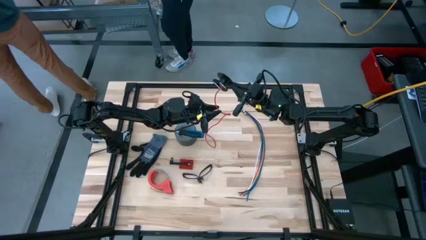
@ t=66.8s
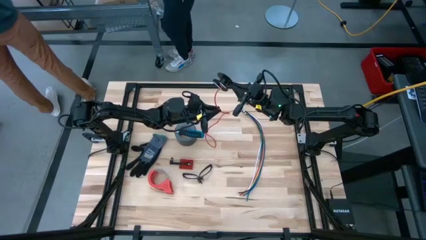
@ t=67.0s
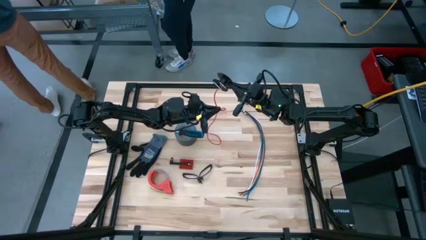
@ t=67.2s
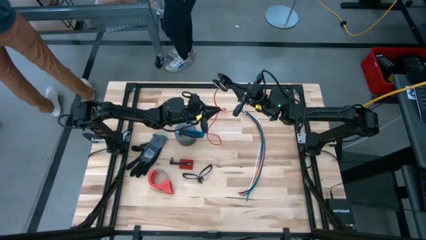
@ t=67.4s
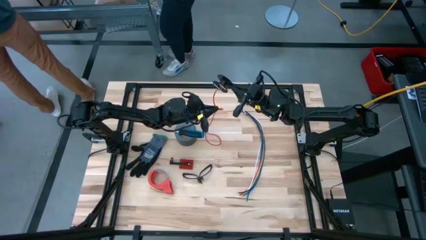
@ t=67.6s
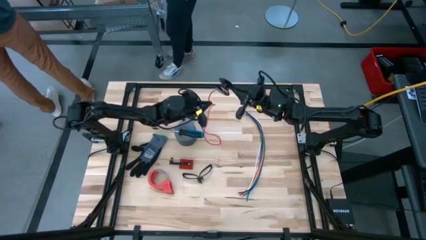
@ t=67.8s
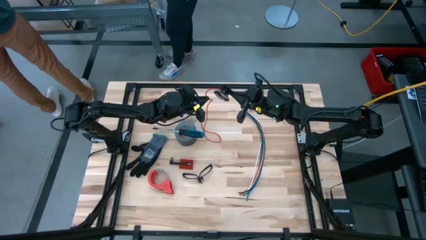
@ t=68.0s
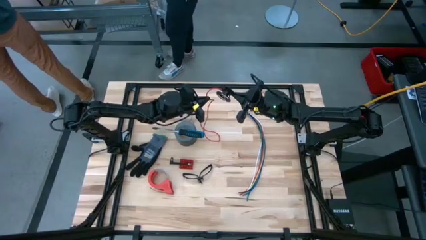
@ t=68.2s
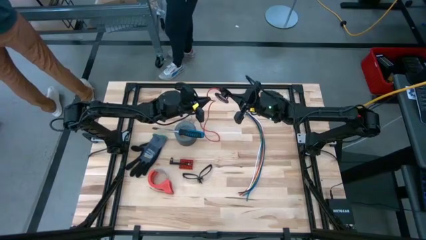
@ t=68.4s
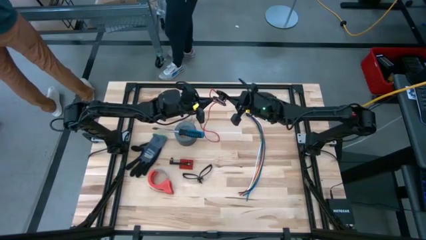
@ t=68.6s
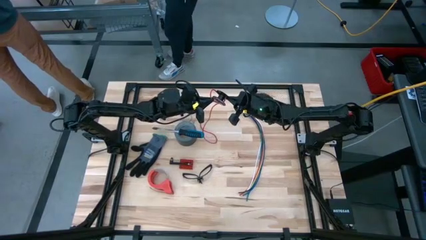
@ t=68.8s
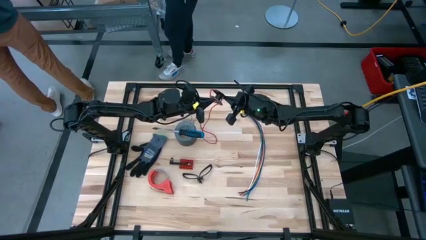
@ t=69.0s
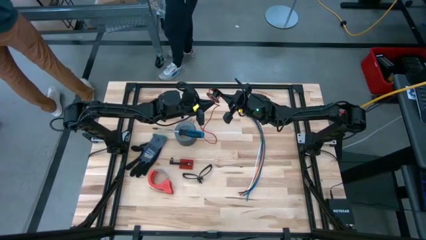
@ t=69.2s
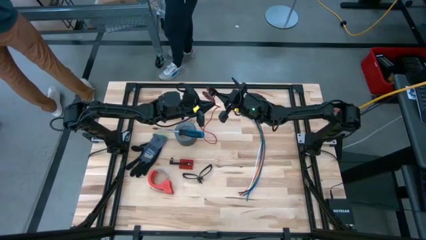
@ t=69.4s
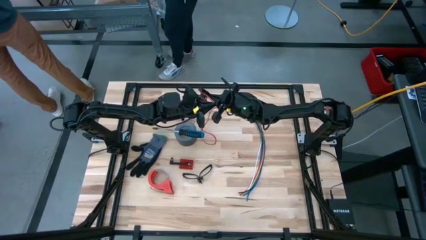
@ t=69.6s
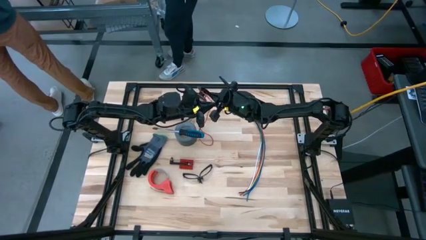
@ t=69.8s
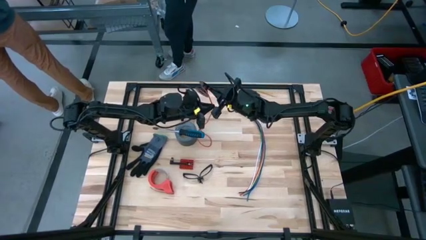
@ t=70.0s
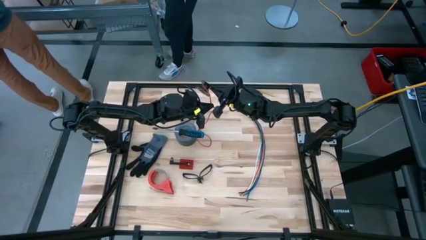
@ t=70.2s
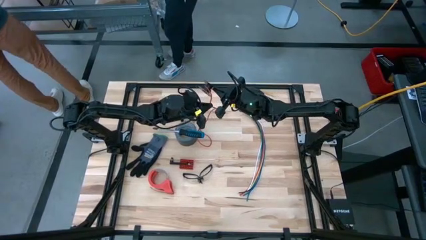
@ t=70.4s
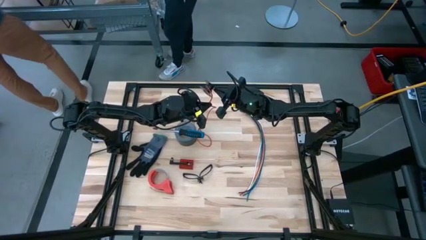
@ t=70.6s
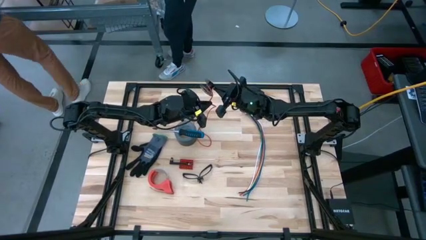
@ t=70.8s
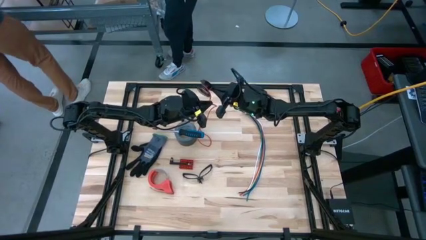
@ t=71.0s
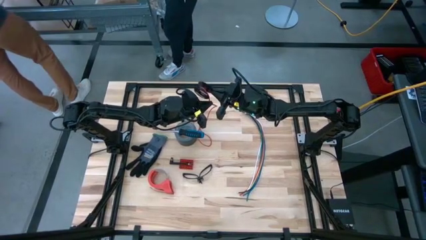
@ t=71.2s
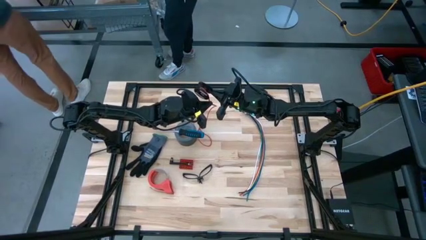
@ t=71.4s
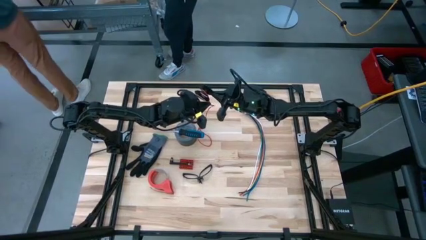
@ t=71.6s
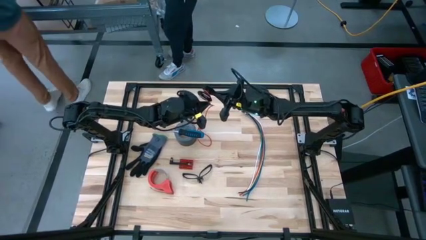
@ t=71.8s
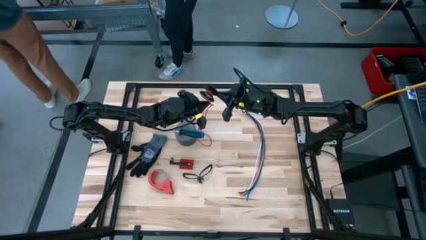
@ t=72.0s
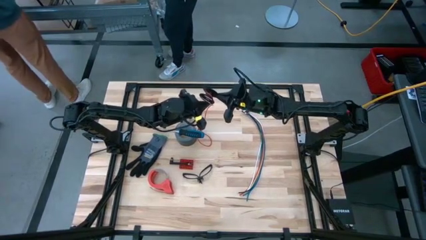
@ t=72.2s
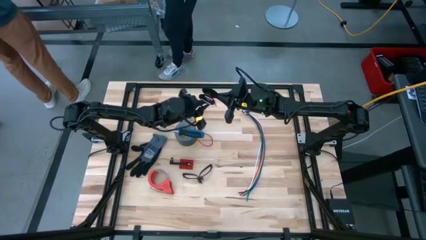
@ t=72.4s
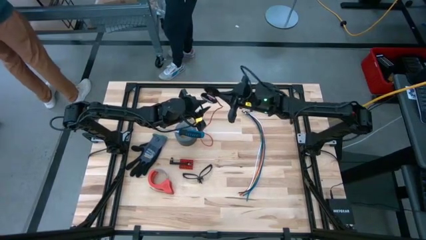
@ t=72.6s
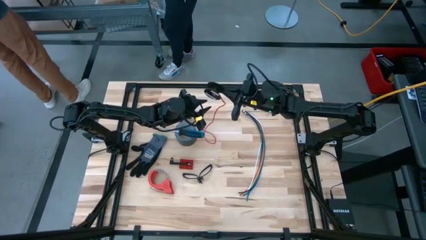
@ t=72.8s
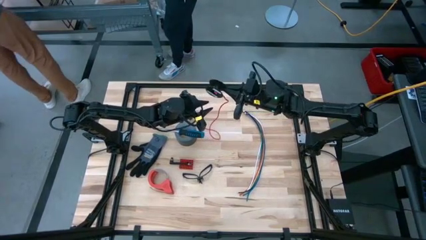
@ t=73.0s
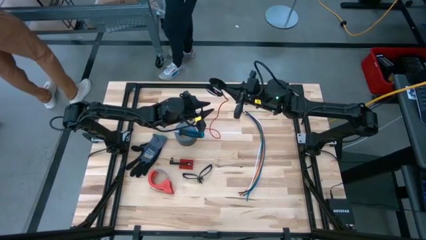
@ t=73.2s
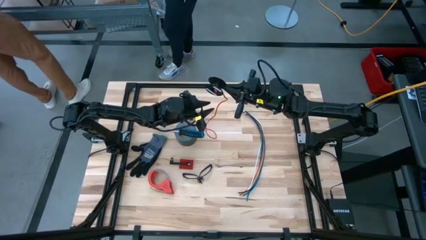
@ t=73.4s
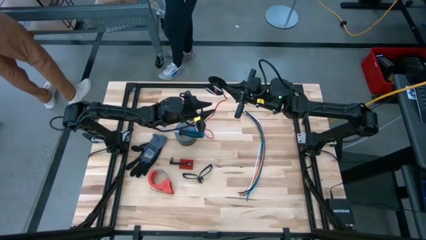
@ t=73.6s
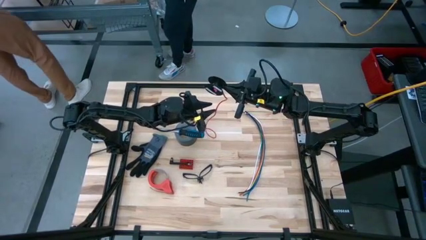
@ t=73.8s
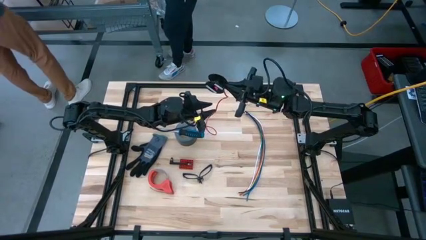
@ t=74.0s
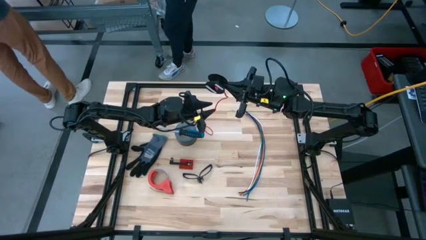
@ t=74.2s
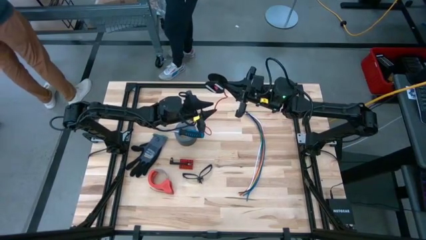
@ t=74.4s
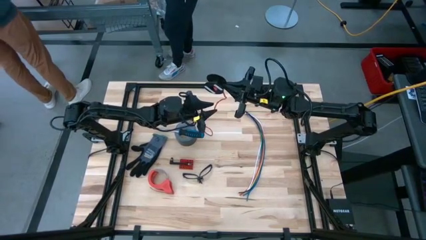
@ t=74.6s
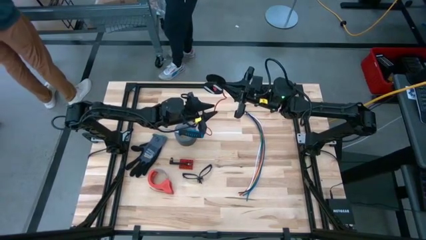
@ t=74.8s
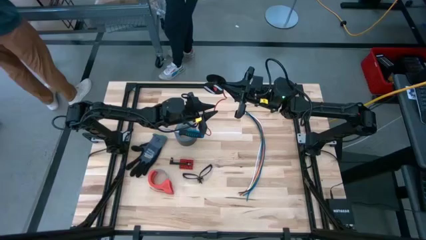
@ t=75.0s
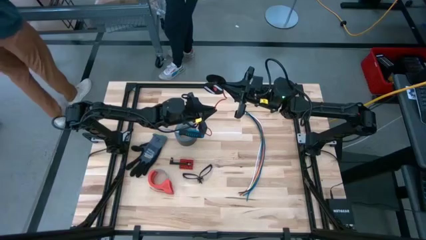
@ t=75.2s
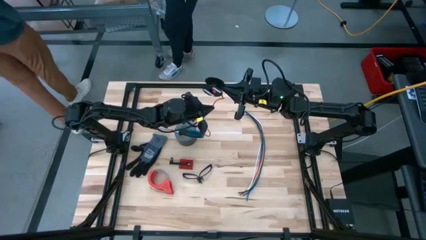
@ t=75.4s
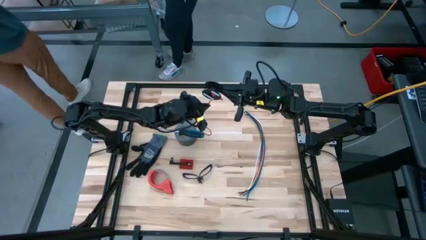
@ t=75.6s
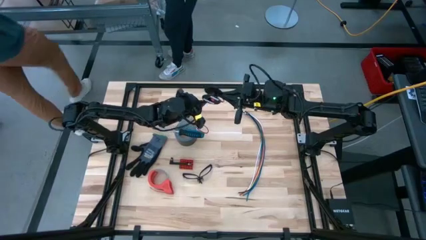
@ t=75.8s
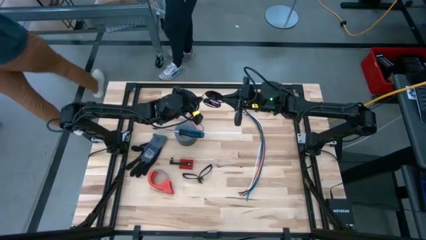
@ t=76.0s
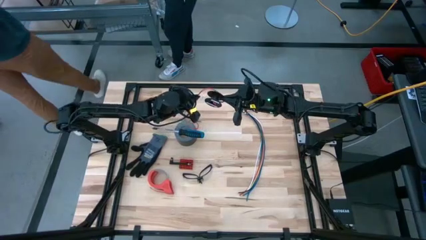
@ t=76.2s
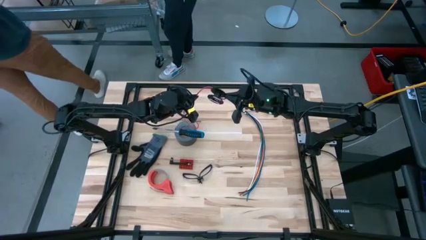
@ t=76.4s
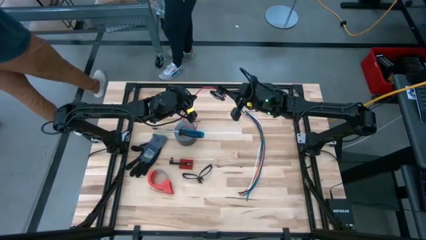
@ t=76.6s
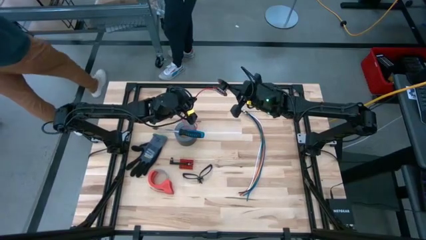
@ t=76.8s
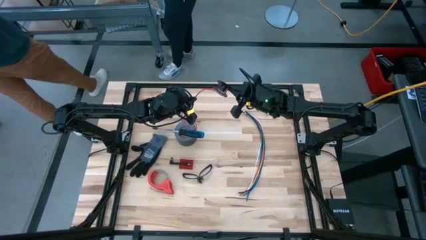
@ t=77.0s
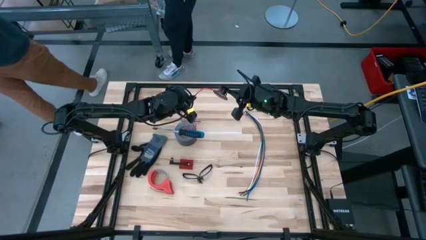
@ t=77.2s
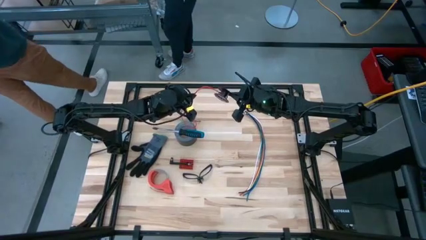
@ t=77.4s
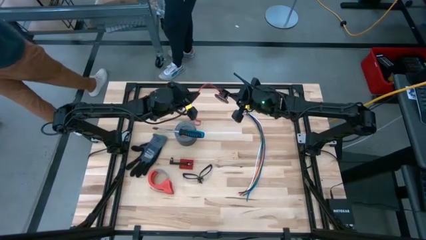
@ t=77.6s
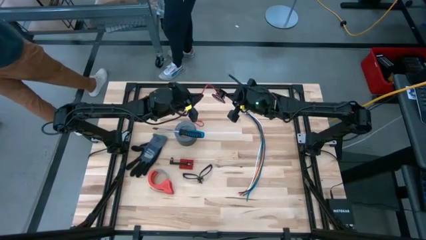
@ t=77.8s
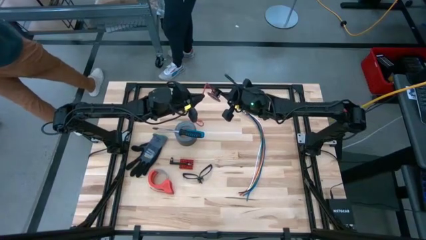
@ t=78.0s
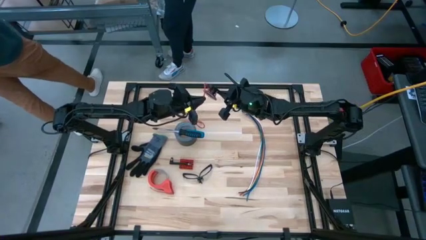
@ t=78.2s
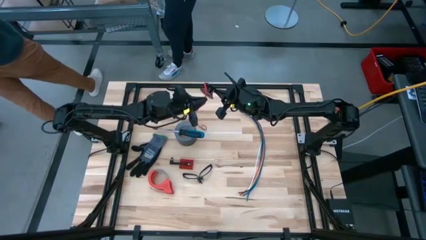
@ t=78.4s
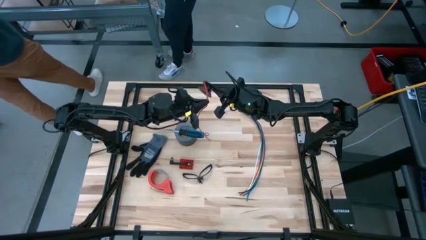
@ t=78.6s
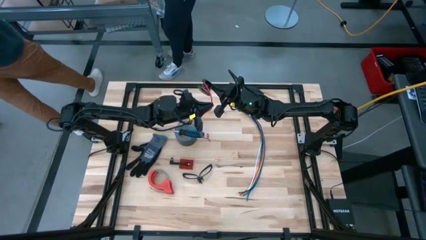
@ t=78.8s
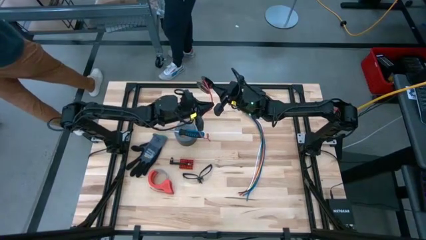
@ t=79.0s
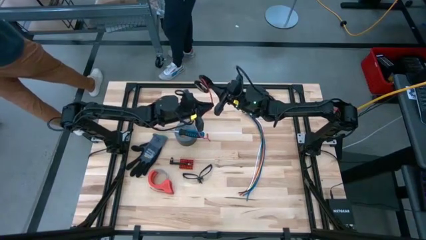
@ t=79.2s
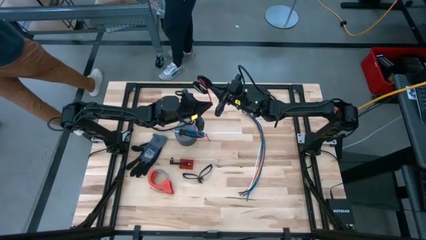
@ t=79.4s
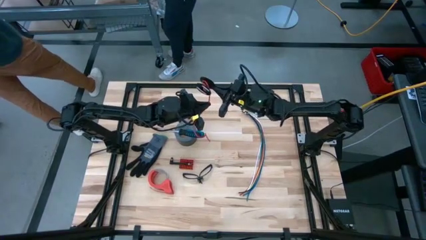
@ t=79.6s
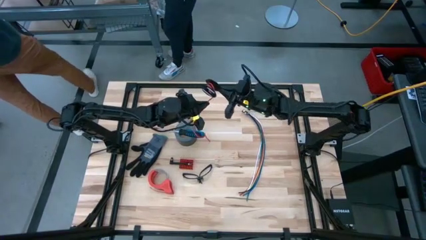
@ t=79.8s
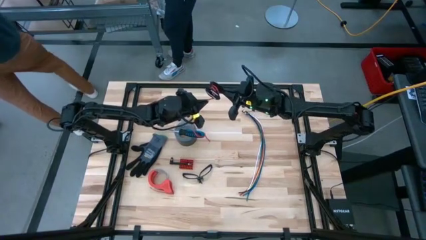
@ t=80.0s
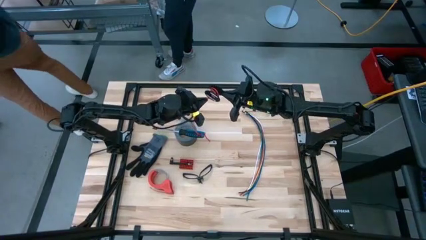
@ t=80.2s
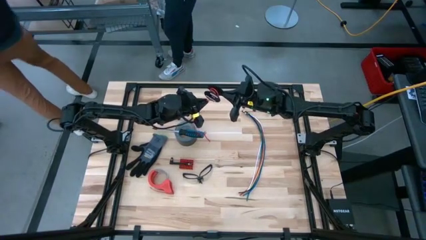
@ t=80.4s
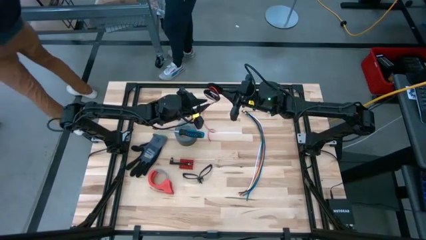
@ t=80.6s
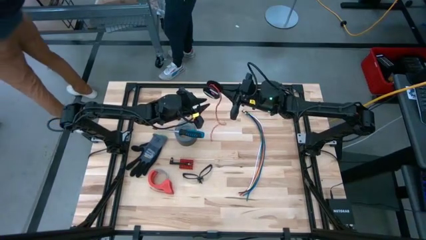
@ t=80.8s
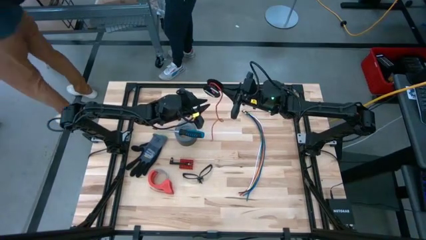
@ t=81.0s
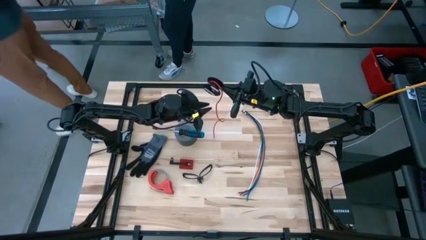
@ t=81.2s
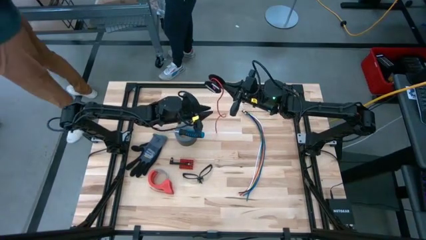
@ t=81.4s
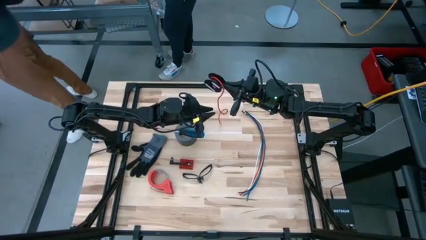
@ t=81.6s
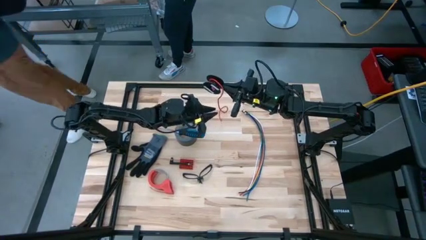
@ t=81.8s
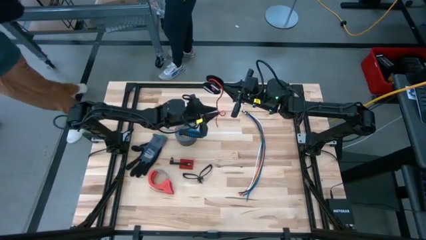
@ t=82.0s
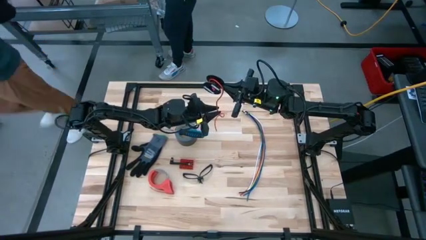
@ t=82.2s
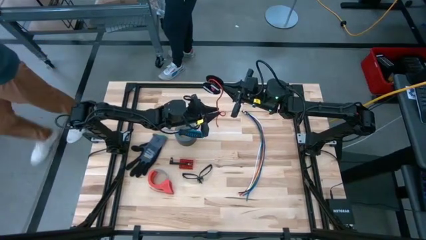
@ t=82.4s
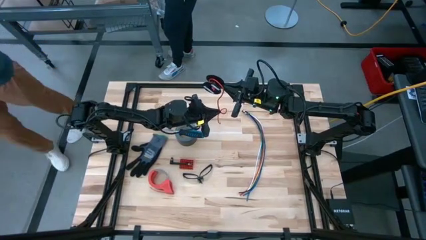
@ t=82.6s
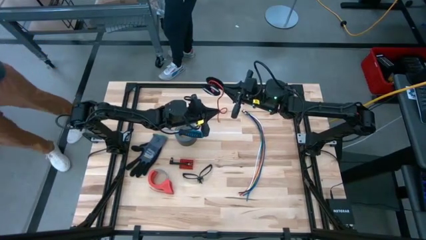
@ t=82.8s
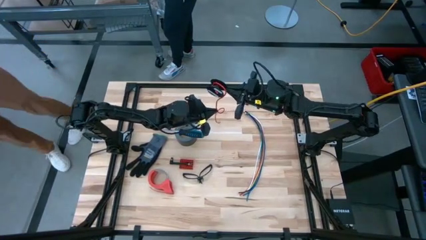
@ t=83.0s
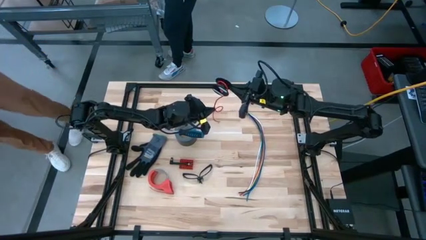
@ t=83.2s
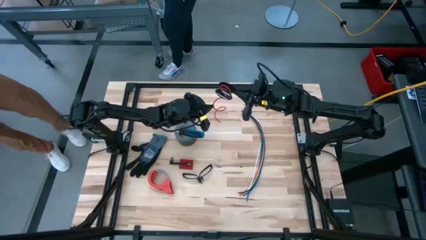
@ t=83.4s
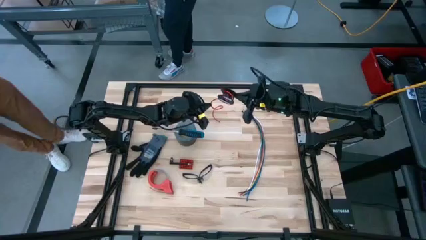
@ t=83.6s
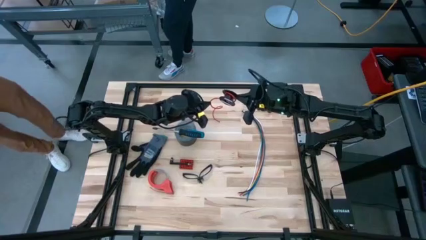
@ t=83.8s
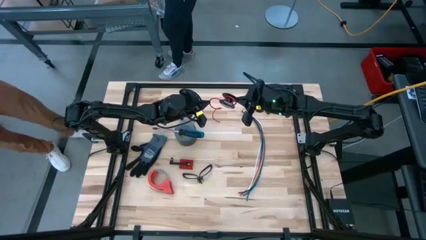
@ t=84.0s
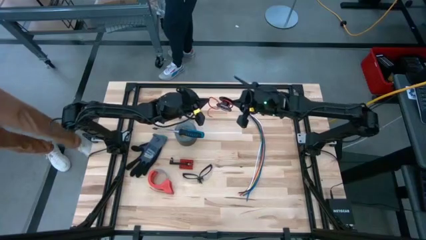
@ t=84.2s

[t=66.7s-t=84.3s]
Task: Coil cords
Coil the red wire into the black spool
